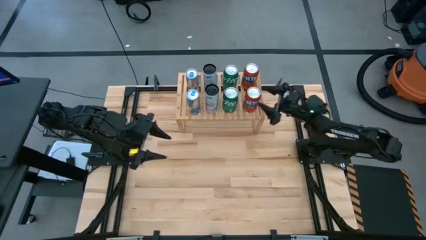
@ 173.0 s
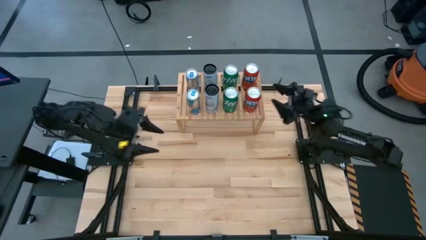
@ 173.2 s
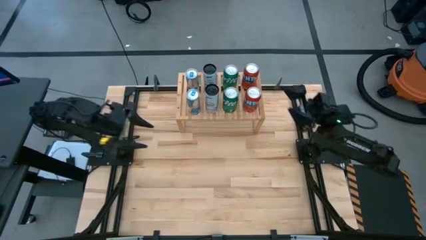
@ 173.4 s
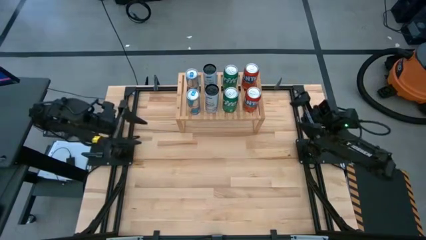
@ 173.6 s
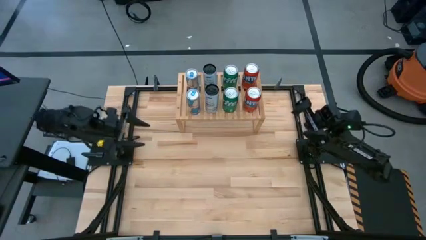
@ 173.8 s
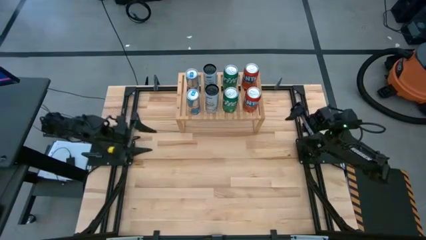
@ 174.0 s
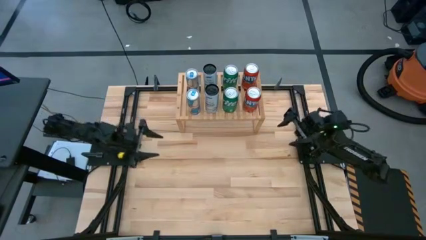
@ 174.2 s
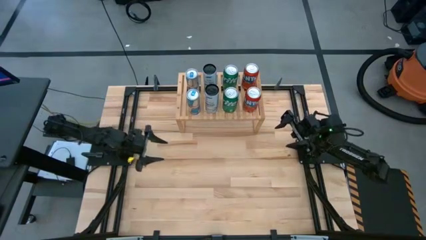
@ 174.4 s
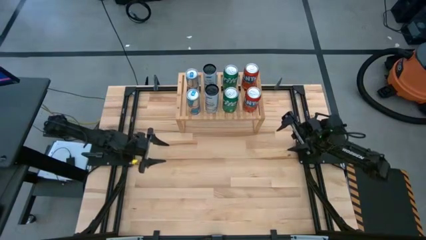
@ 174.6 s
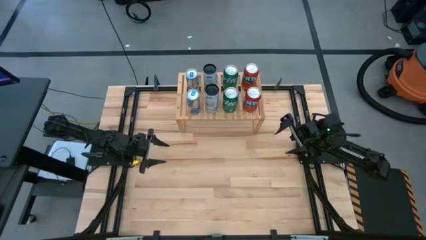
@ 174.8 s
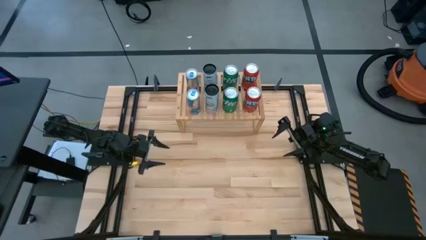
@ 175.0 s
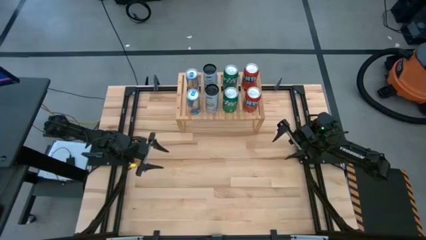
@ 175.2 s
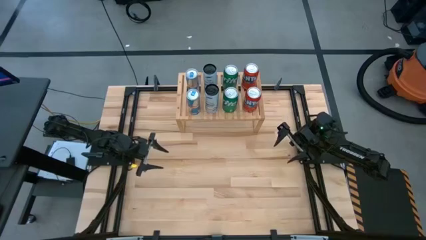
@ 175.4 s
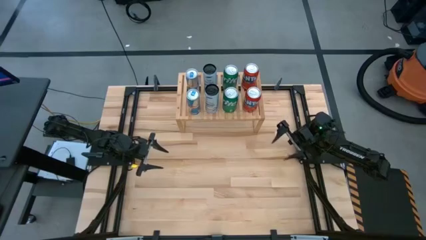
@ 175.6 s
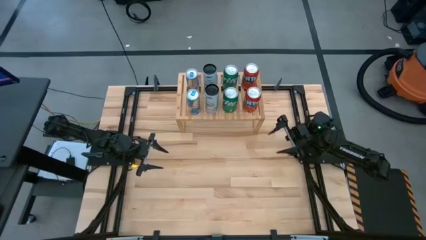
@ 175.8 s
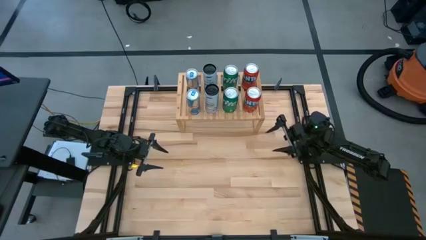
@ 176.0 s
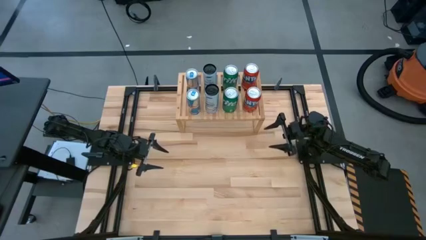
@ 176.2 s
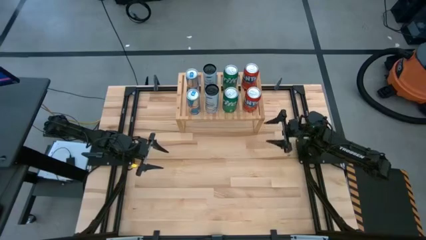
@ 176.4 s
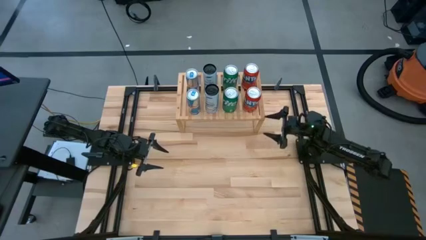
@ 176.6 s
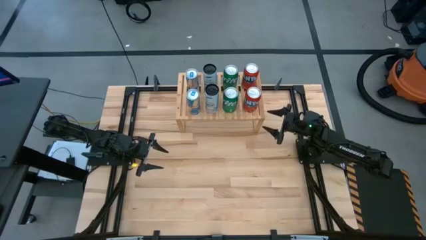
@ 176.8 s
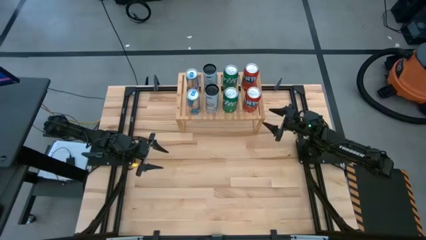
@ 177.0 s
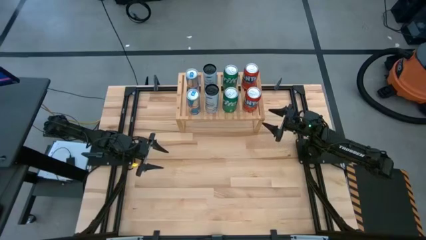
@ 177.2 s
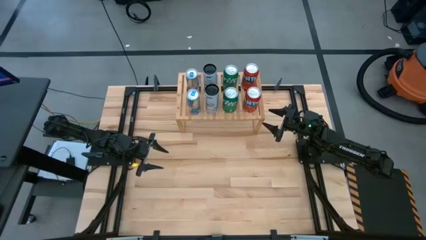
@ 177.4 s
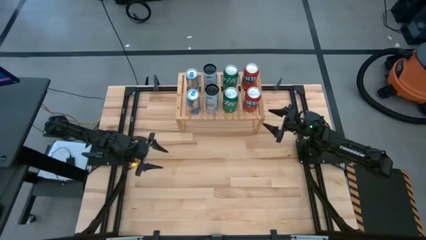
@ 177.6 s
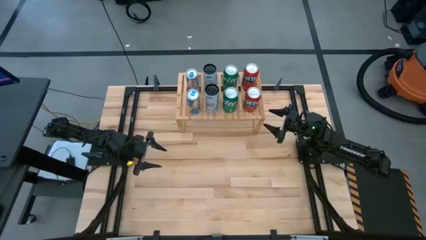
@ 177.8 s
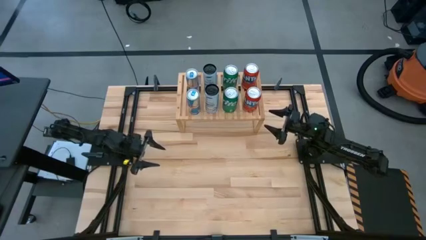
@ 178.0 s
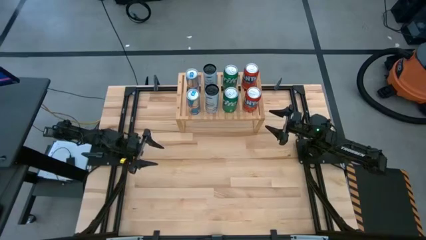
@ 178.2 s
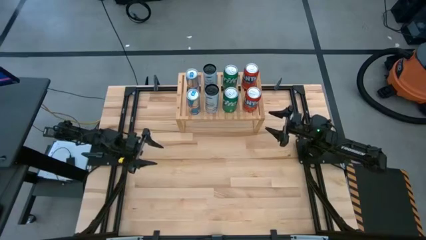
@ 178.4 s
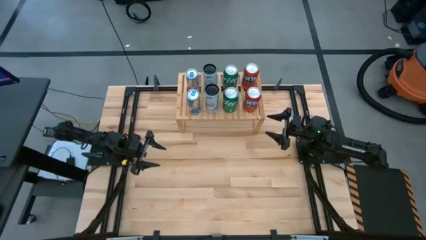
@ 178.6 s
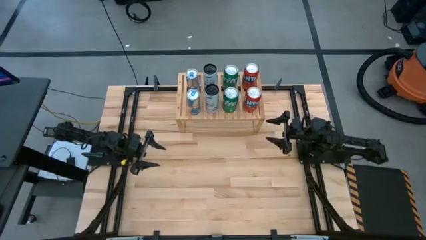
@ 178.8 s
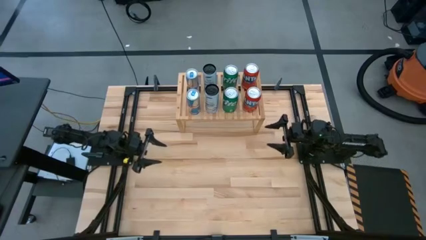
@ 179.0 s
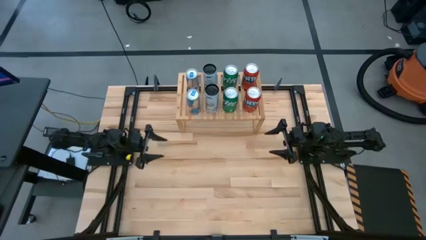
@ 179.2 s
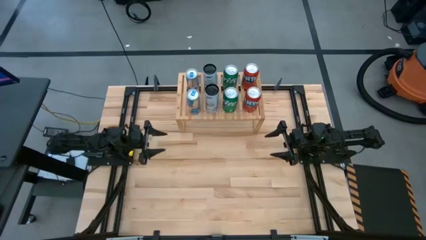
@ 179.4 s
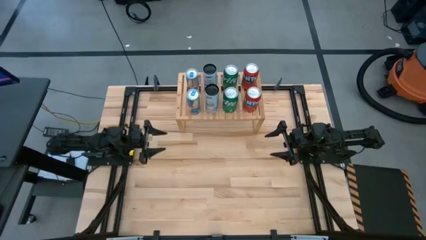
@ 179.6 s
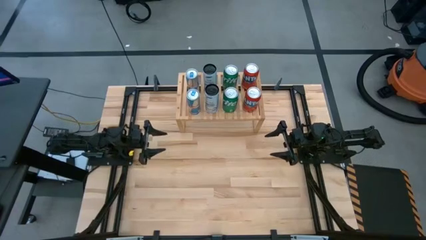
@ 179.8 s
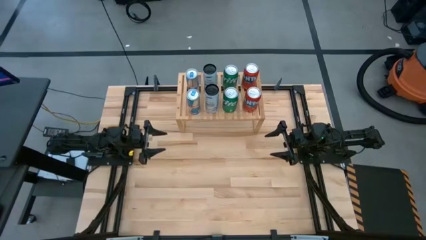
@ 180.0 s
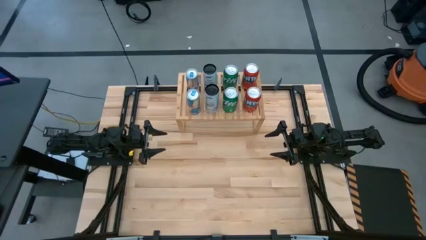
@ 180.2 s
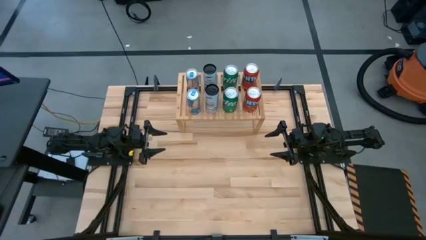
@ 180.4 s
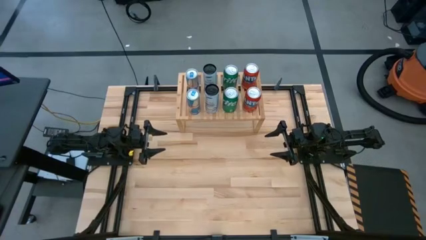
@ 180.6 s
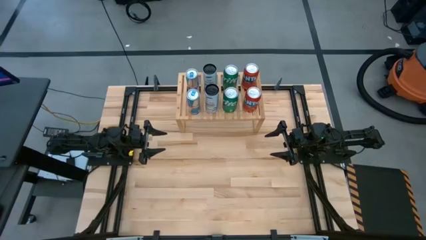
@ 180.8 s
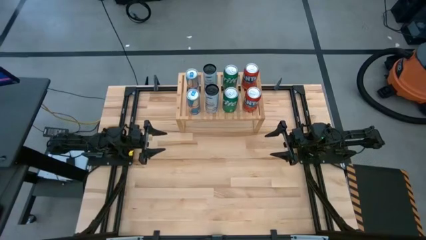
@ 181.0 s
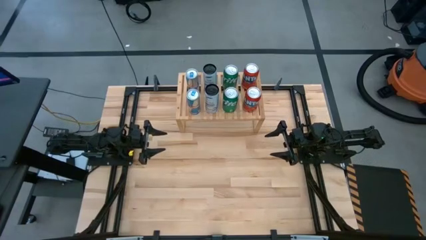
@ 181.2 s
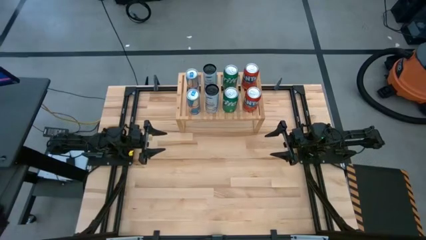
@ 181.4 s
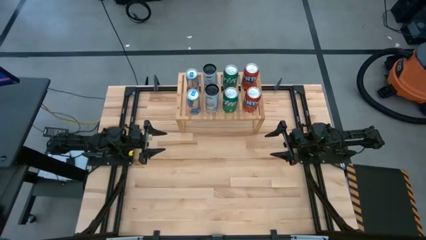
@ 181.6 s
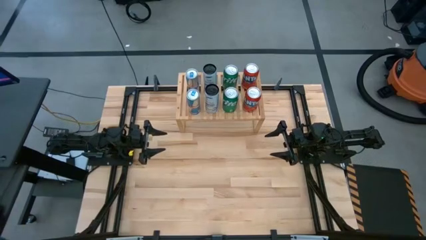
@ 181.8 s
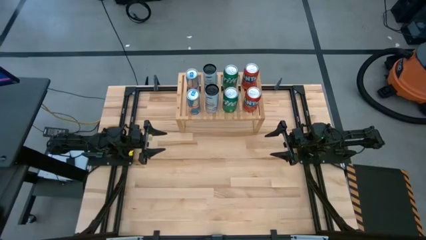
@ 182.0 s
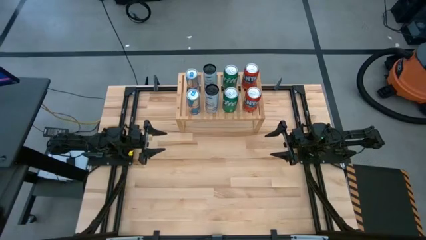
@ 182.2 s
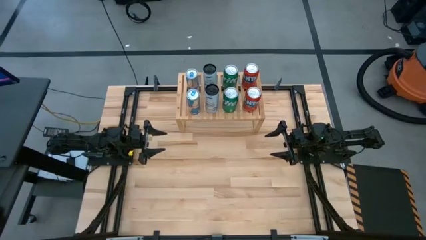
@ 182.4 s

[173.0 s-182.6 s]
Task: Place canned beverage on shelf
Return to Home Position
